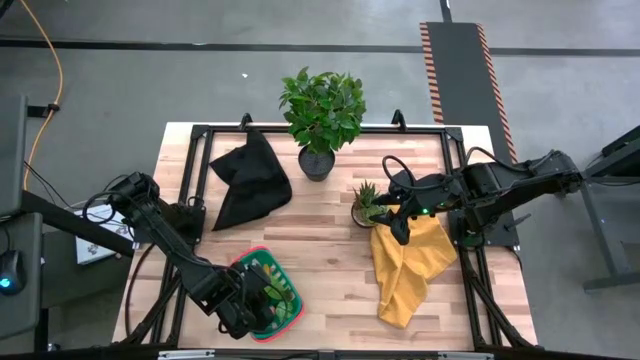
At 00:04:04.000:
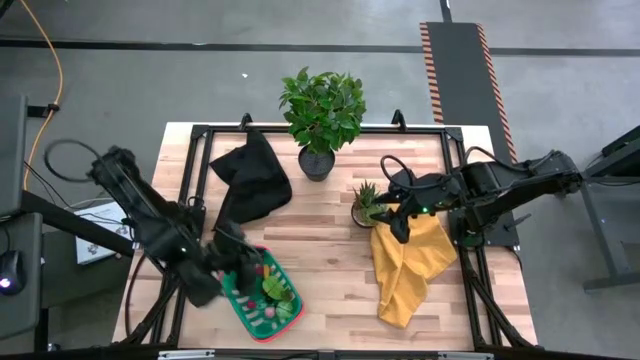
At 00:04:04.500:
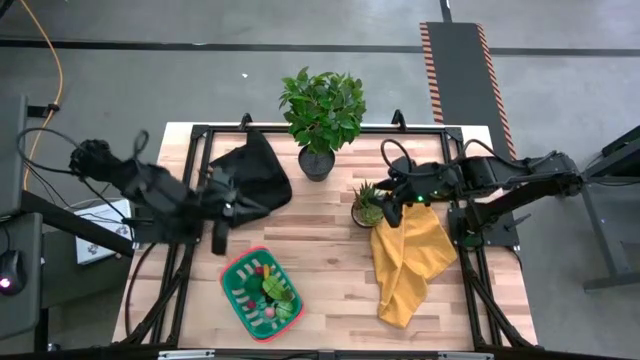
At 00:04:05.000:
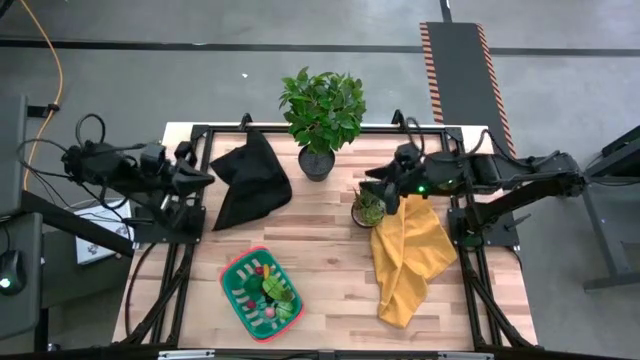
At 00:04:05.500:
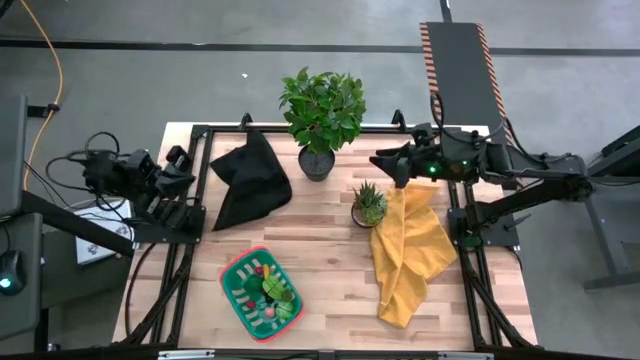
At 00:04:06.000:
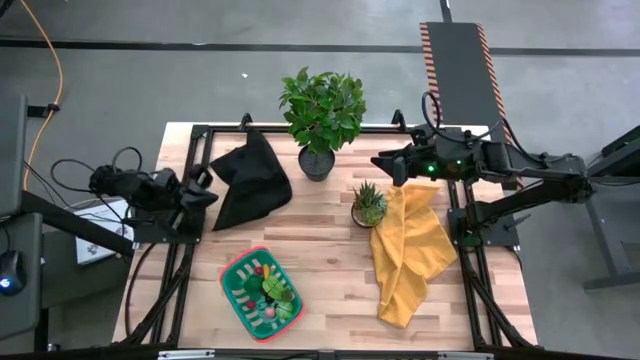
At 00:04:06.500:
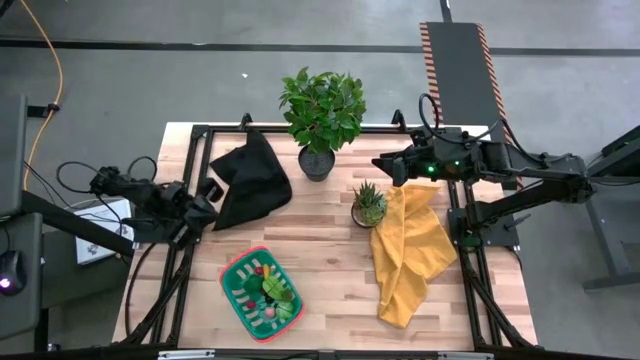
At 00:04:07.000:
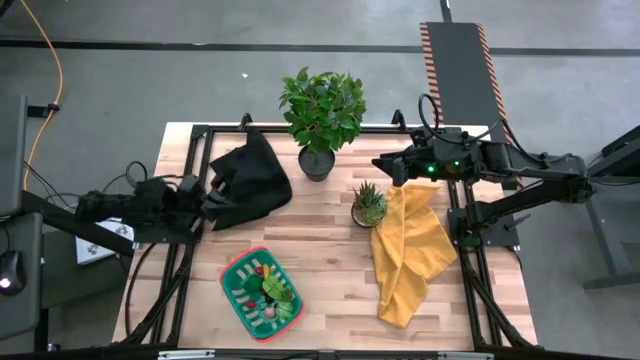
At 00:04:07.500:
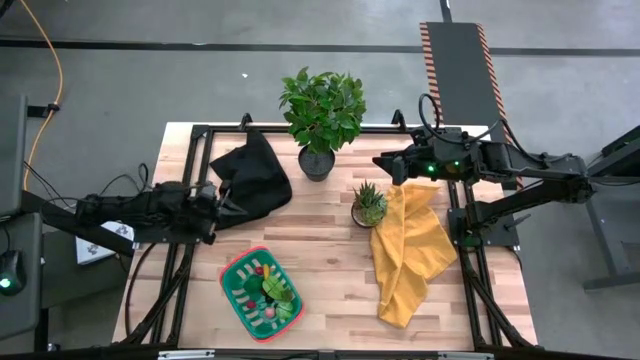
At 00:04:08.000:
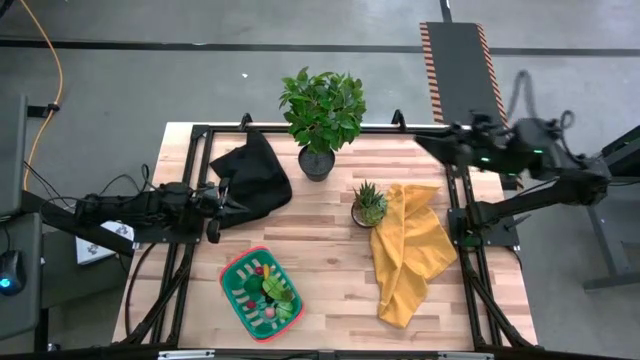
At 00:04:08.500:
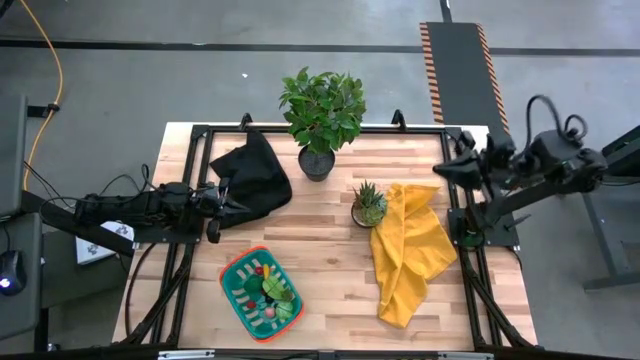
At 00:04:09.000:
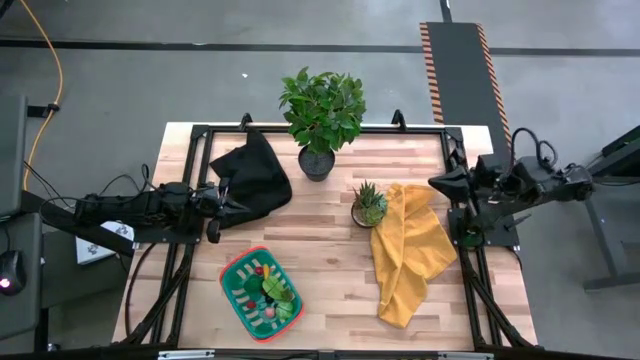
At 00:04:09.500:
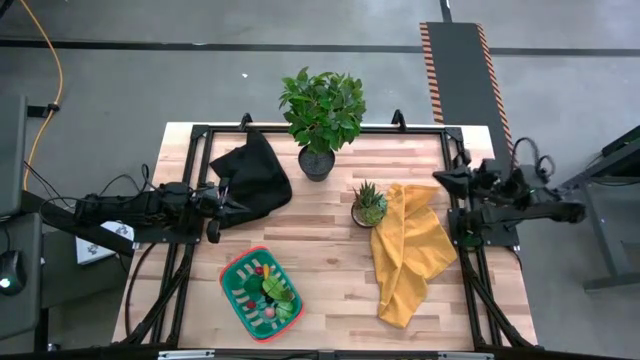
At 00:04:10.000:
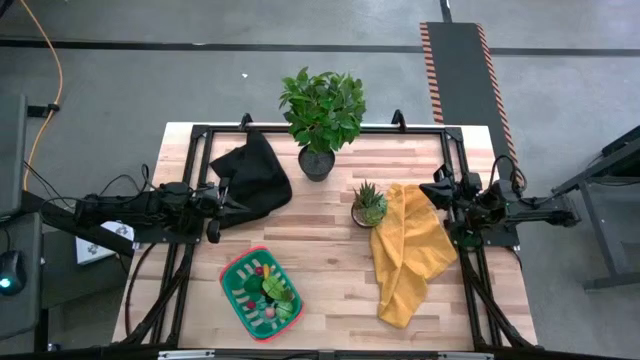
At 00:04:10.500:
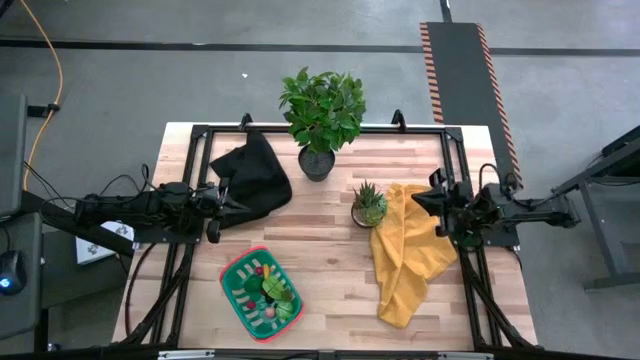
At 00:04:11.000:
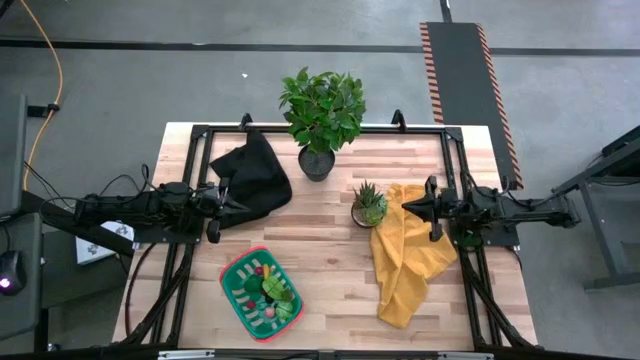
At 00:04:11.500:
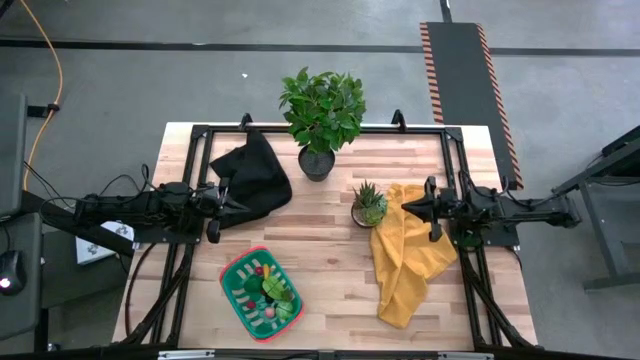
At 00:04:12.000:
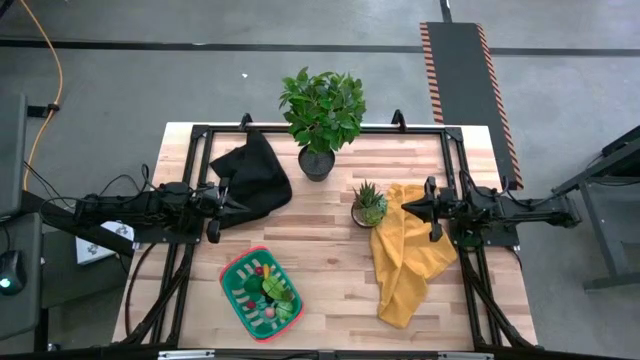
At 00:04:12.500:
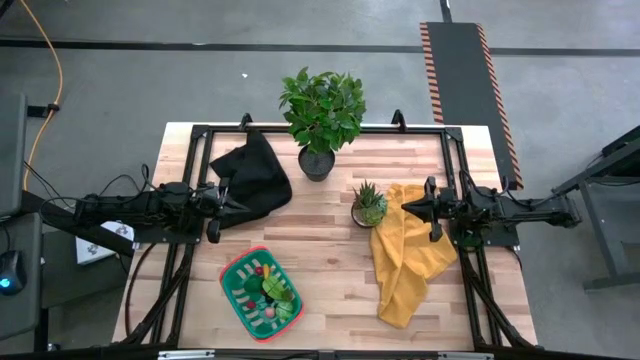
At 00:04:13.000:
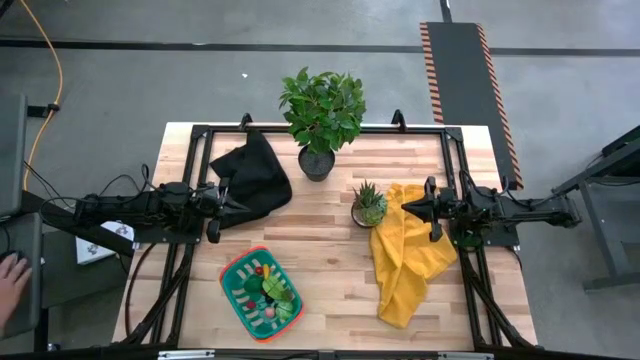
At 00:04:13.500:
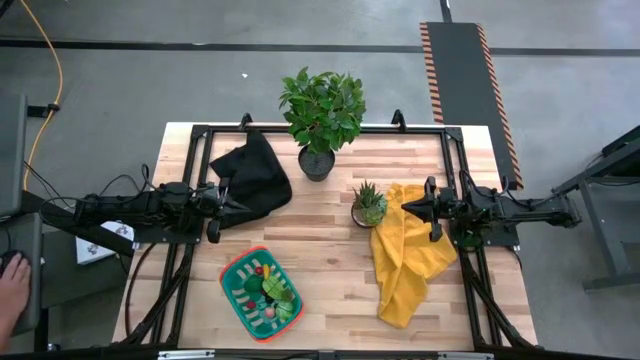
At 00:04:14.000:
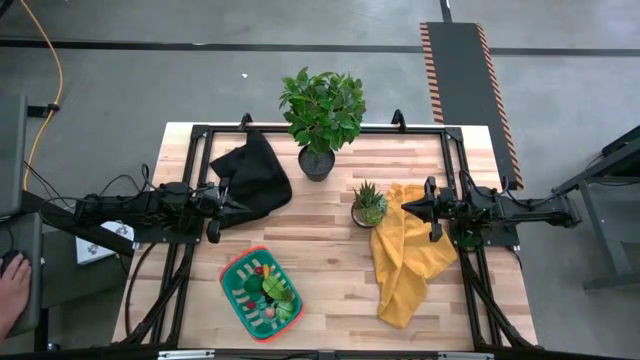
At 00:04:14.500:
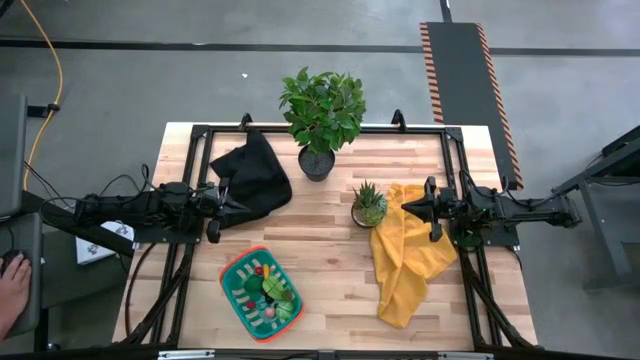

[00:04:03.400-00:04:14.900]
Task: Pick and placing Produce into tupperware
Return to Home Position

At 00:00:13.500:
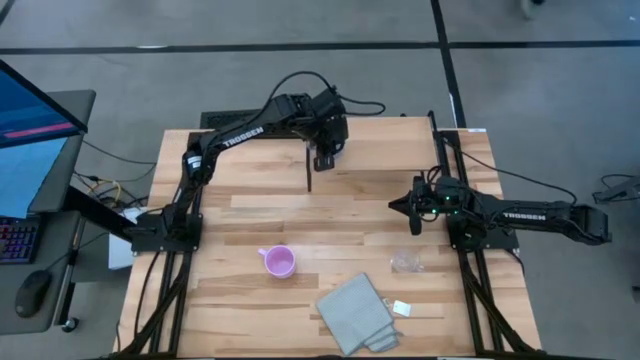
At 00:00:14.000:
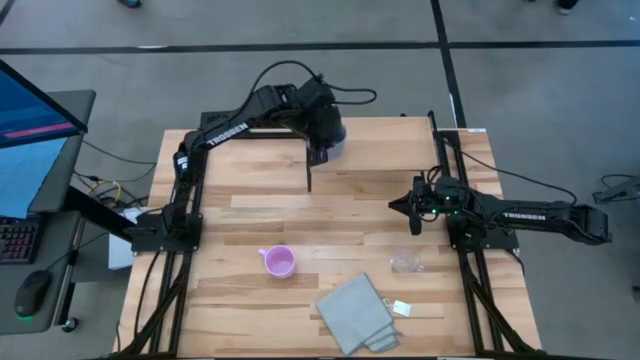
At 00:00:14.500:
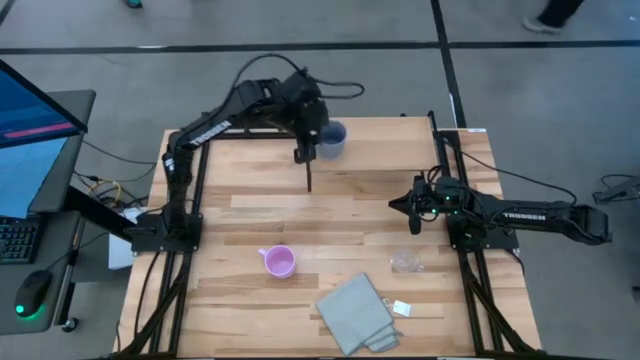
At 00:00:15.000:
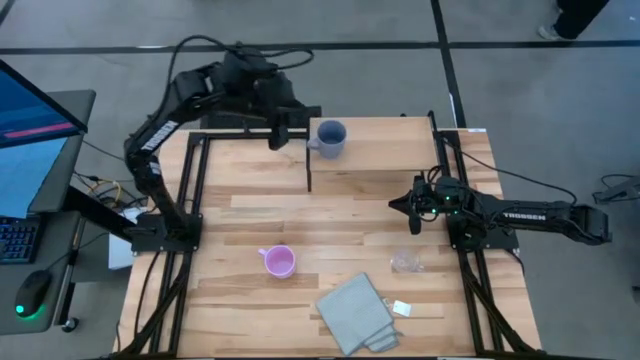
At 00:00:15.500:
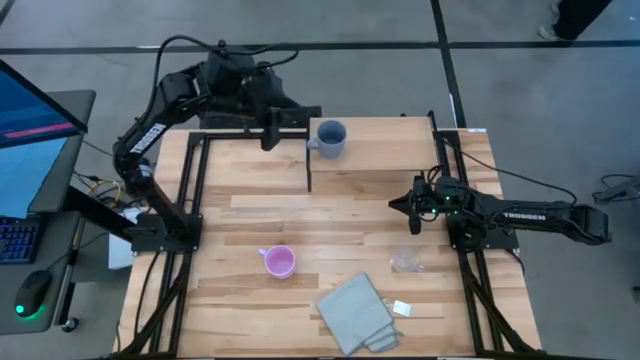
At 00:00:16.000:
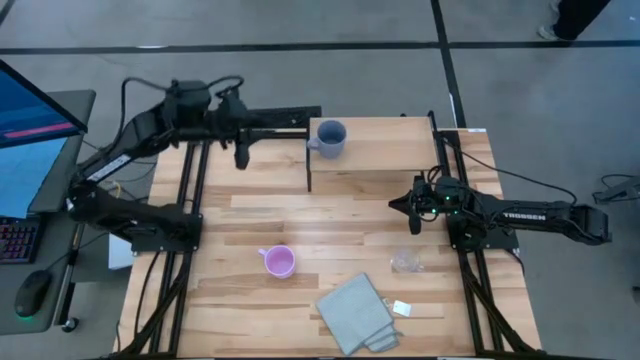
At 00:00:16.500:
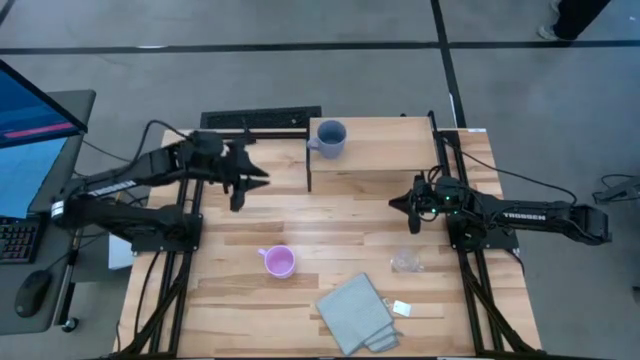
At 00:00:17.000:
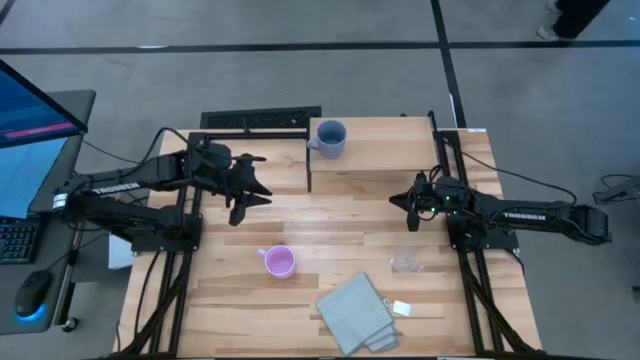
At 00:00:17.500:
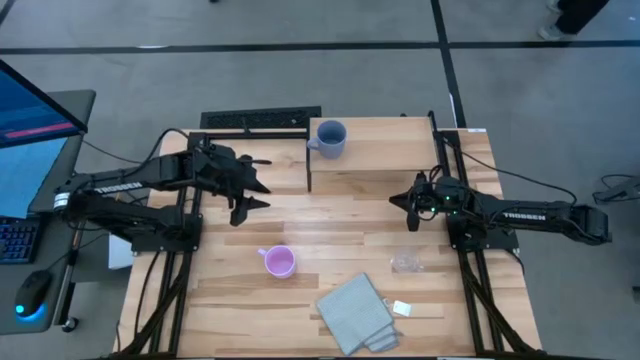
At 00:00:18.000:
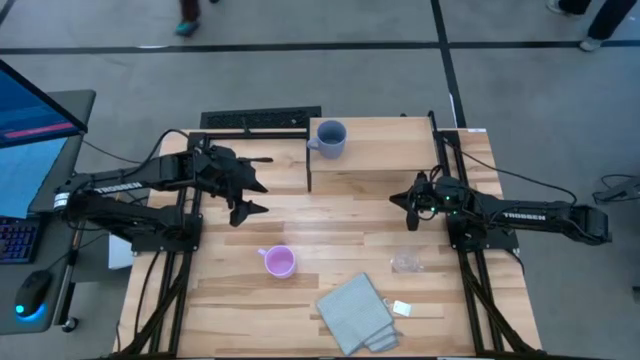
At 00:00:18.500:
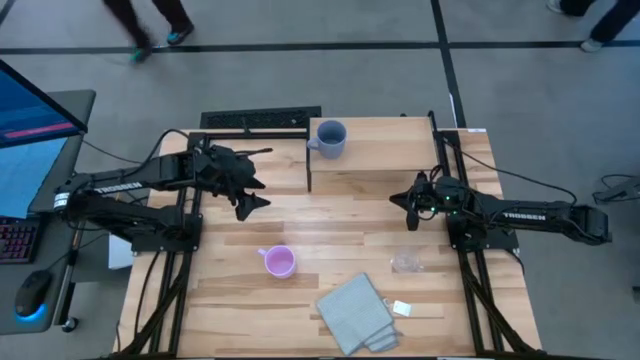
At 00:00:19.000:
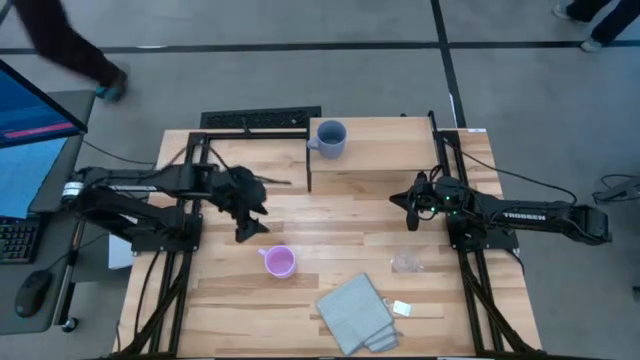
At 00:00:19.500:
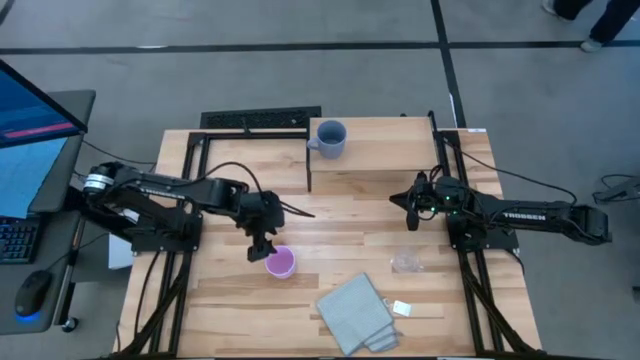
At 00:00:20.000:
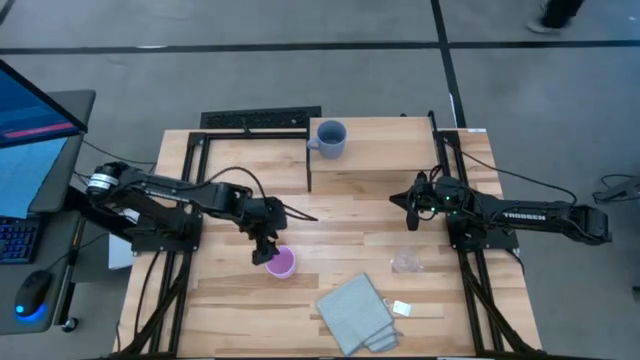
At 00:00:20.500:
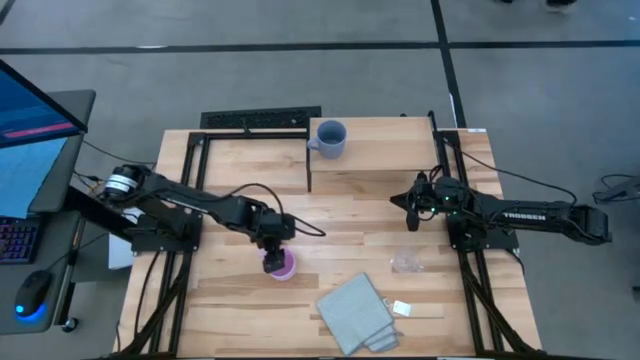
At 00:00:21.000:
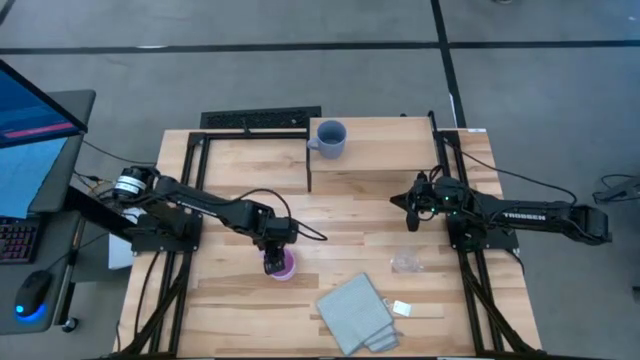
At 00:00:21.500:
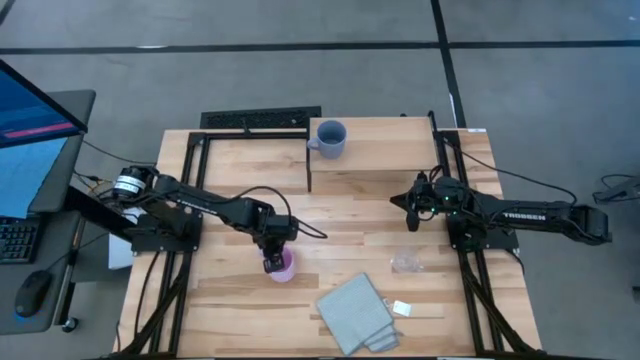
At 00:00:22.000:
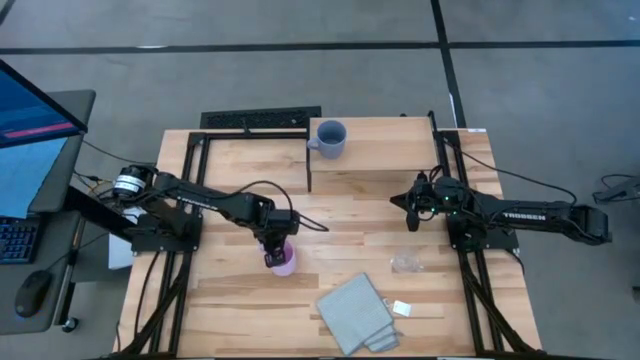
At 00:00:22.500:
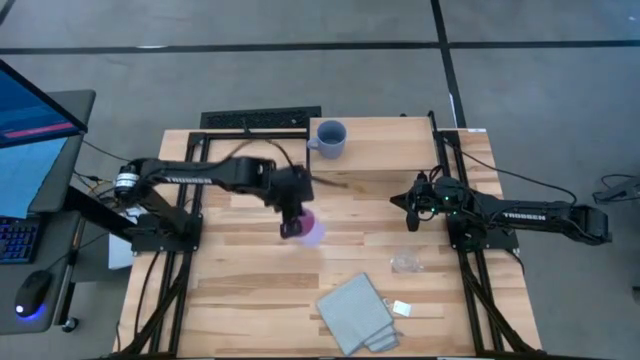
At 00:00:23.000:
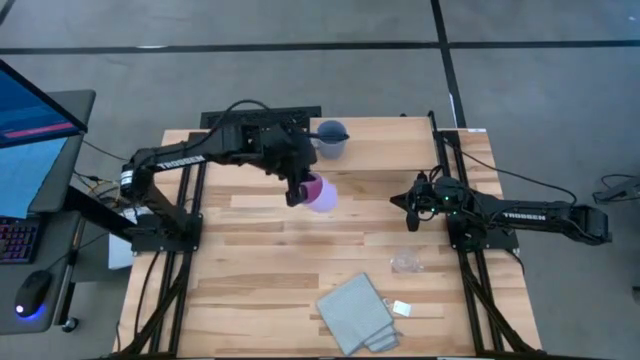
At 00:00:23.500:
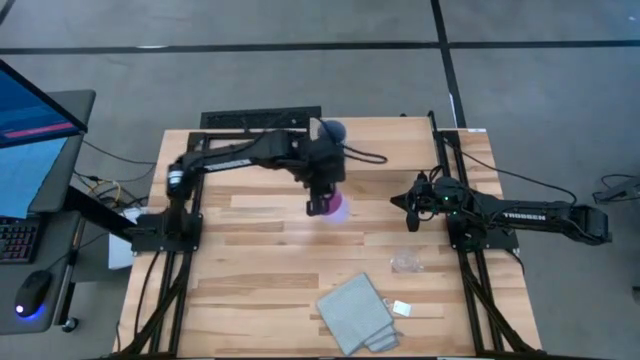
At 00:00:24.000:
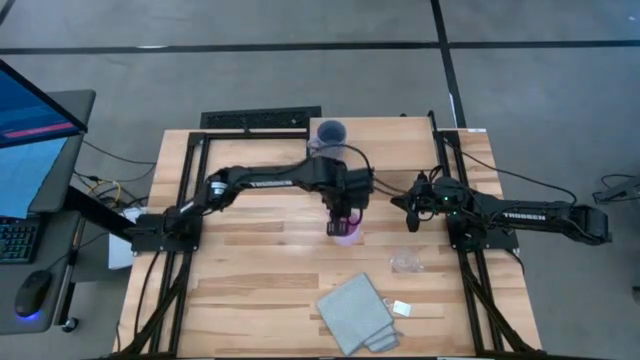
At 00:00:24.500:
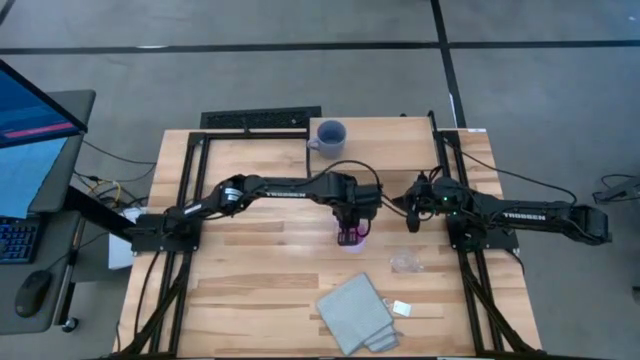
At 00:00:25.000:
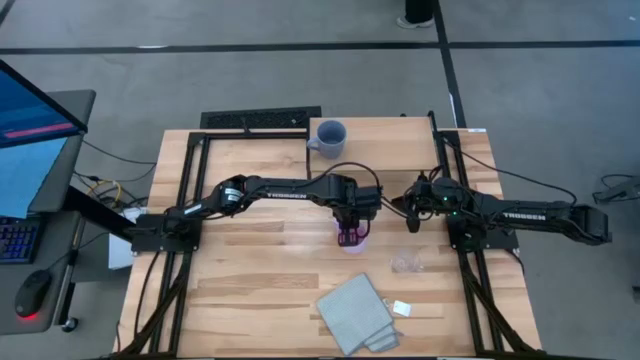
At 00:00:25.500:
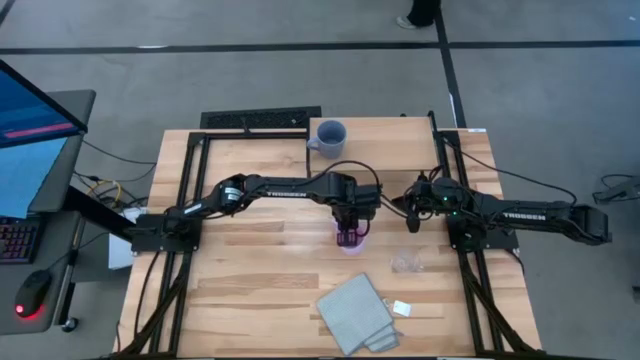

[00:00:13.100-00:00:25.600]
Task: Stack small to large cups/mugs on shelf
Put the pink mug on the shelf
